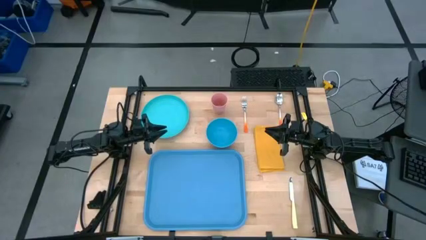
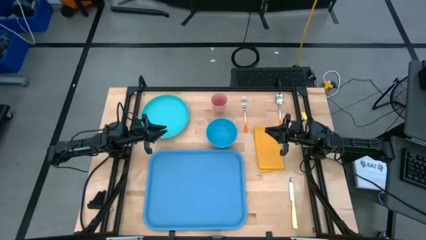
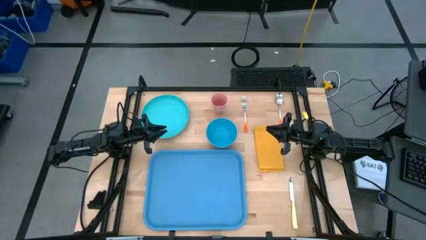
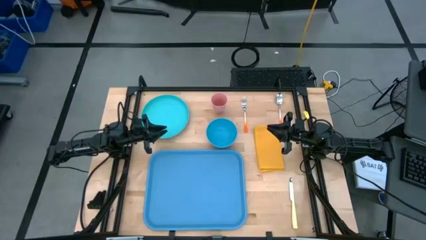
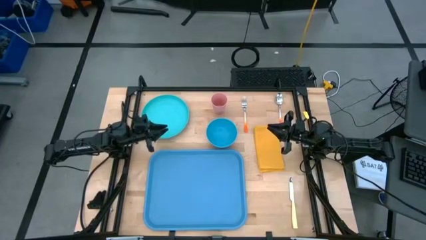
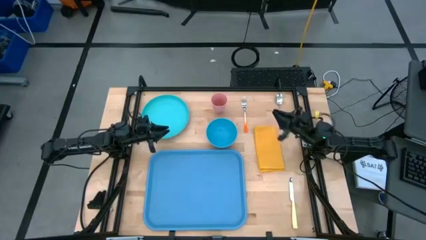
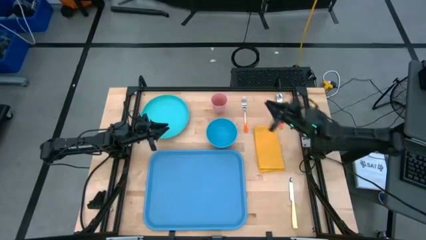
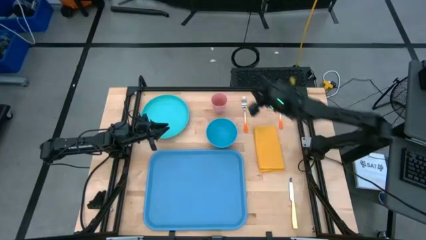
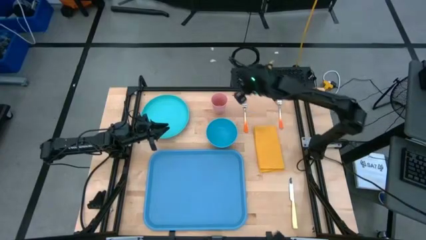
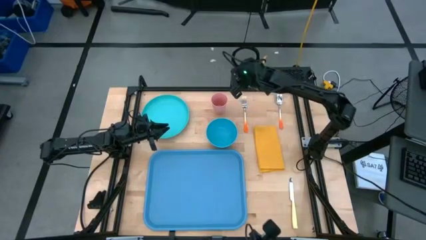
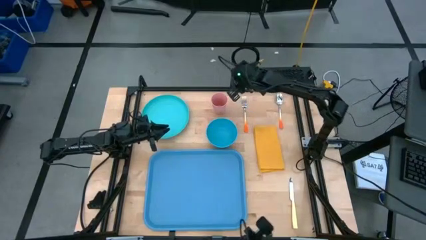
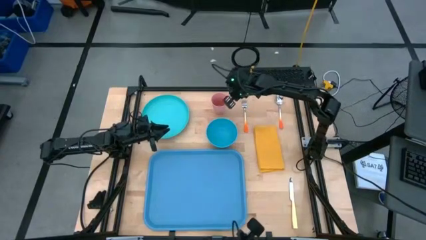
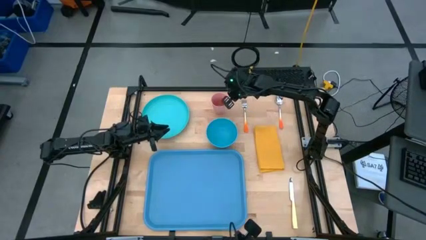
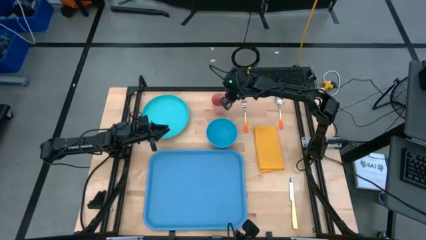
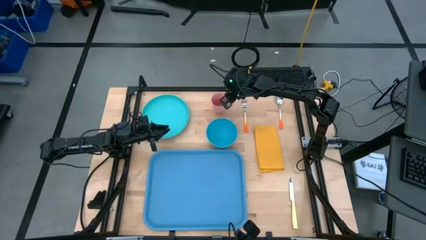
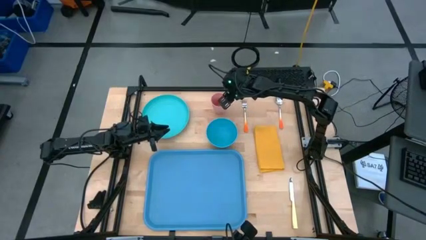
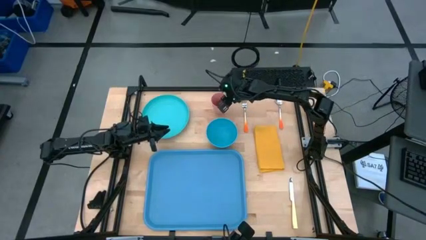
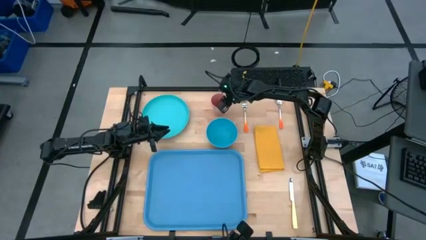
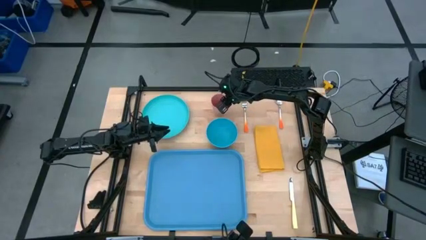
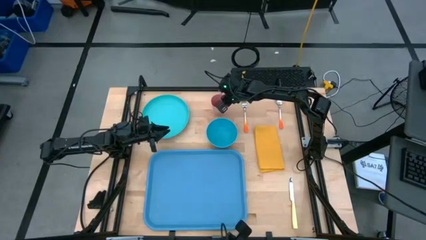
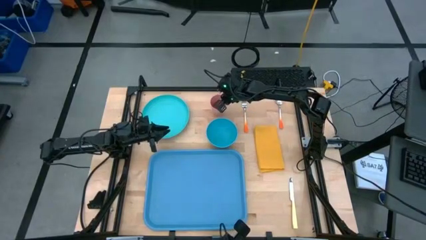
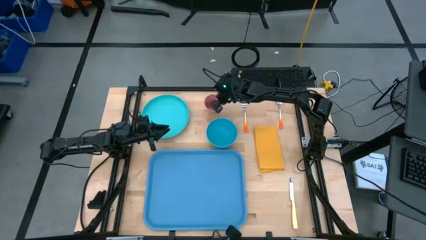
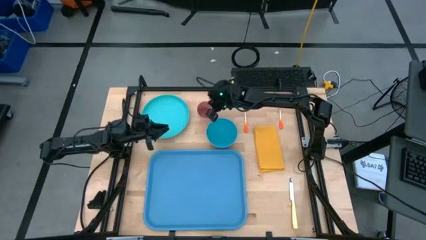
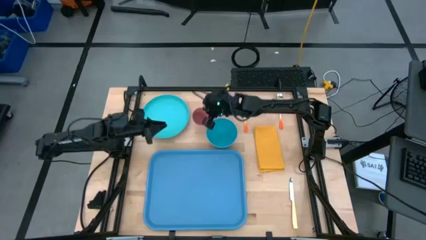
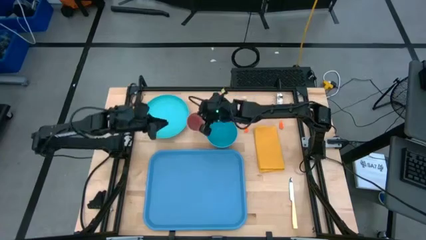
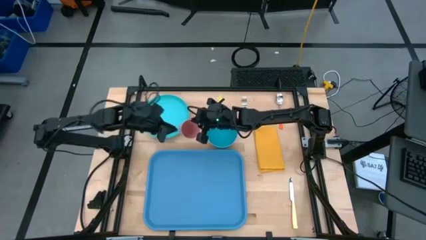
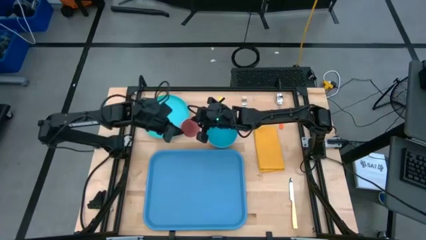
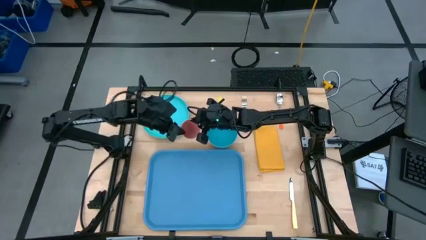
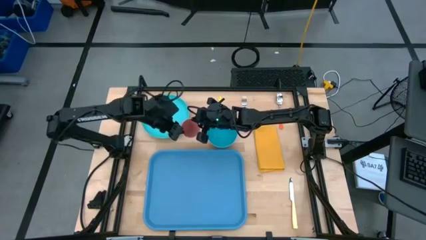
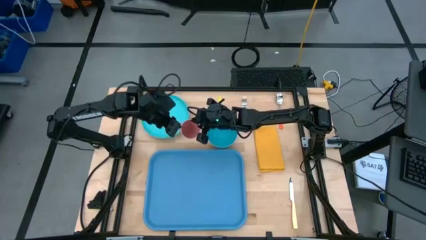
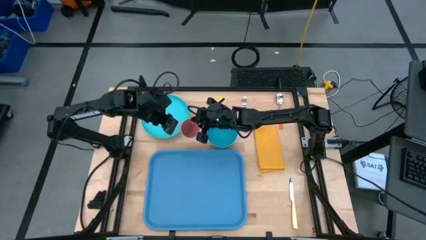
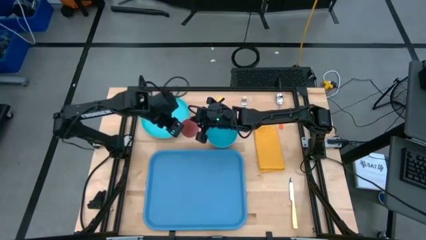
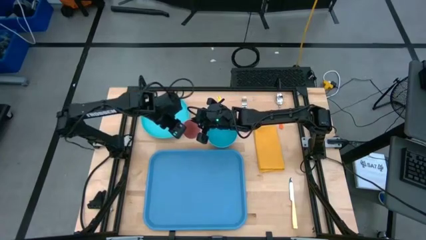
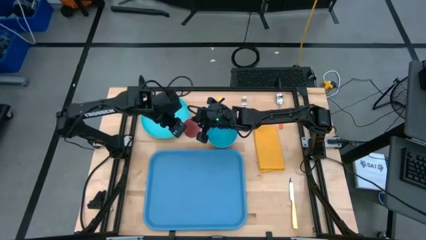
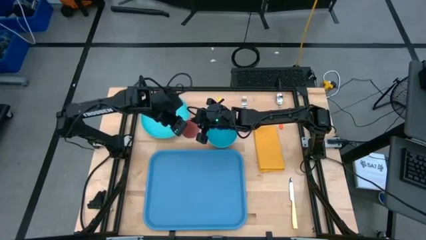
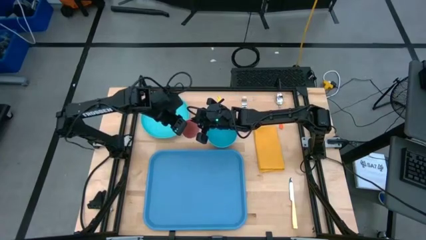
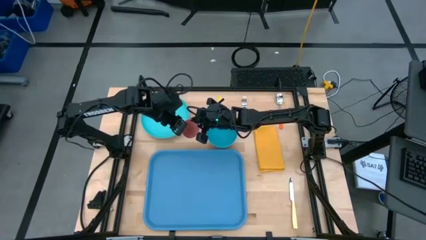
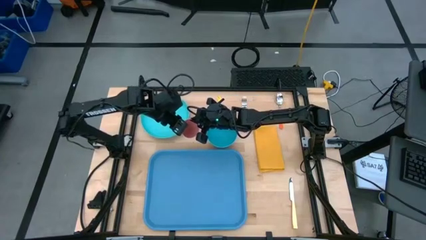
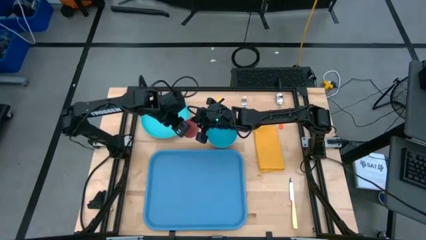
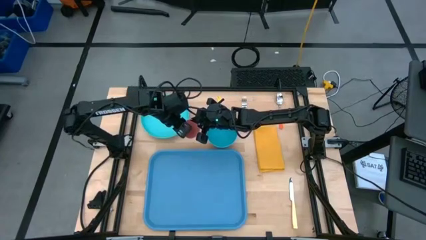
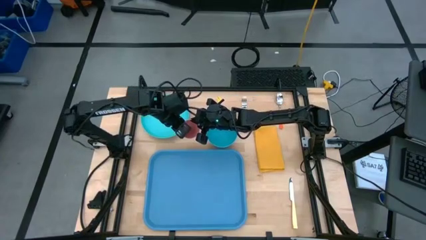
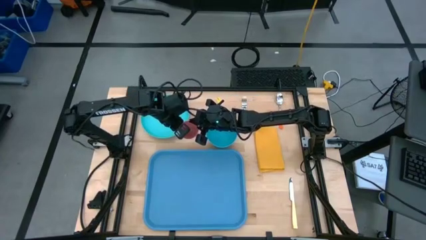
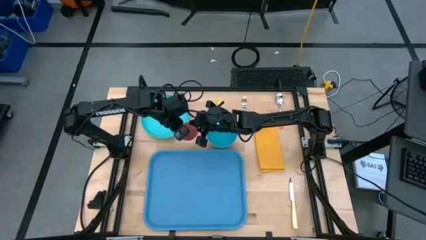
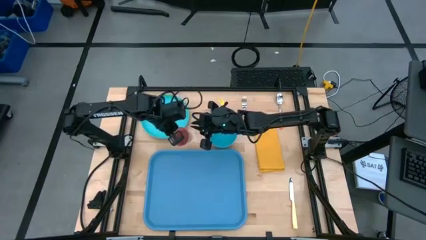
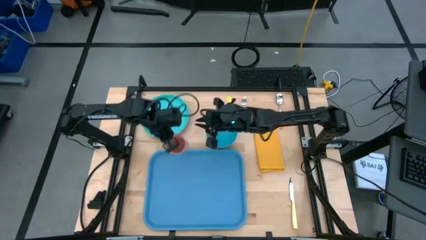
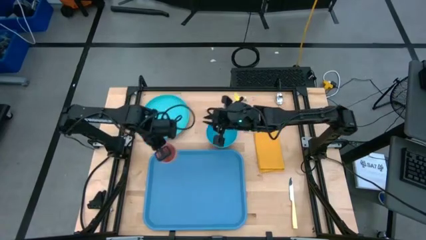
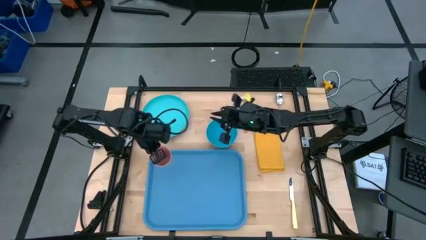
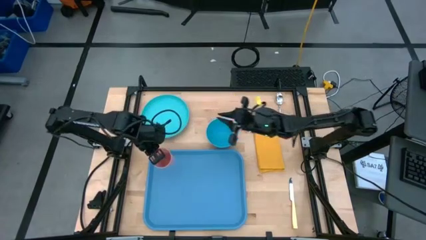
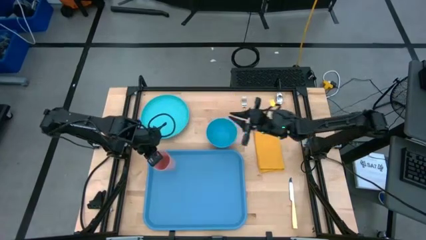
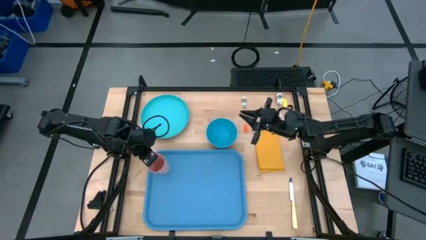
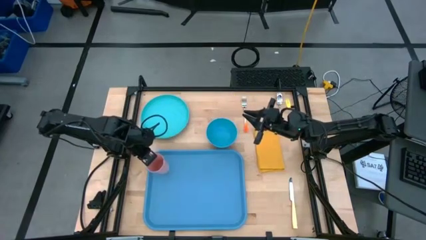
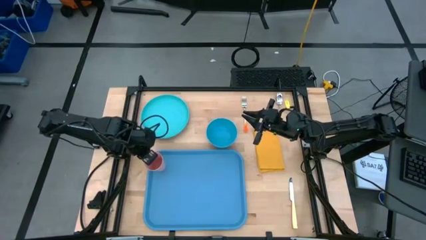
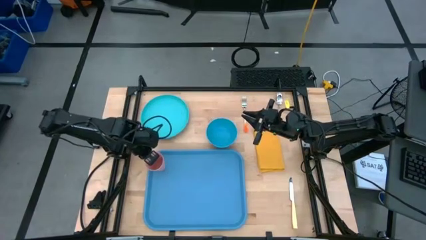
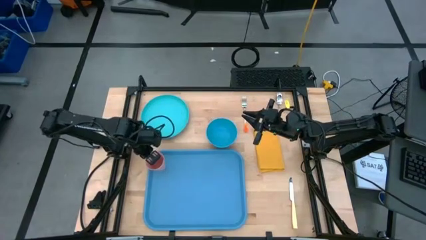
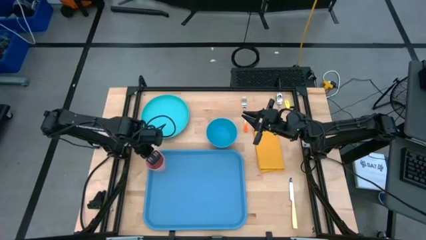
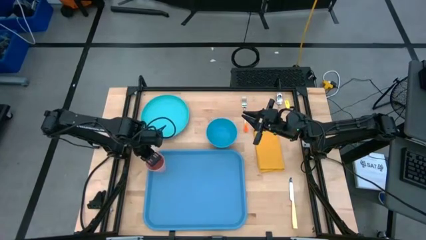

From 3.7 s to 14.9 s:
Task: Set up tray
Put the pink cup on the blue tray
